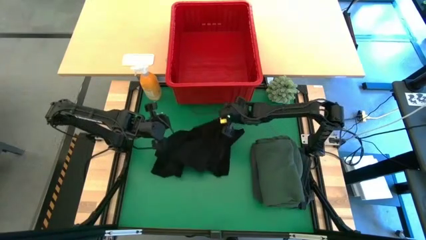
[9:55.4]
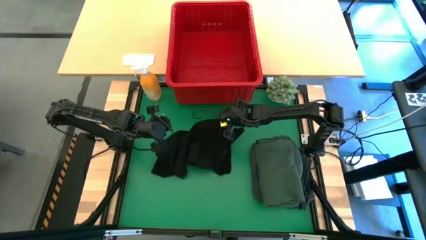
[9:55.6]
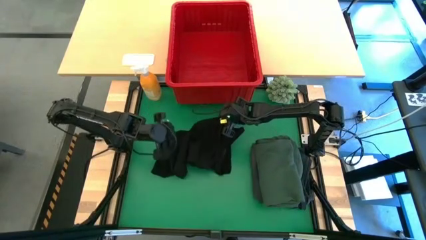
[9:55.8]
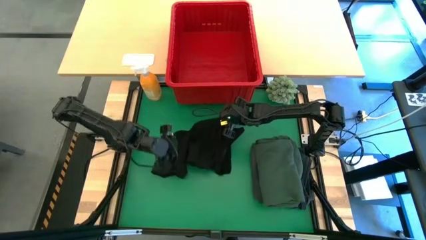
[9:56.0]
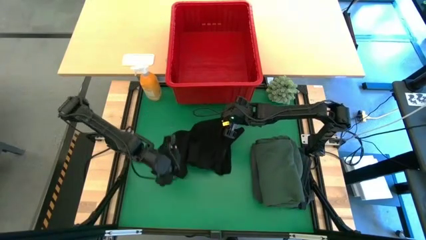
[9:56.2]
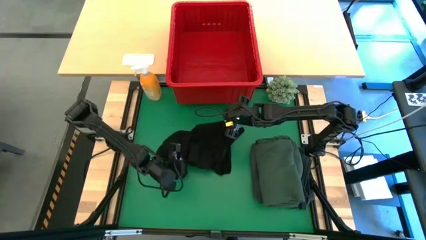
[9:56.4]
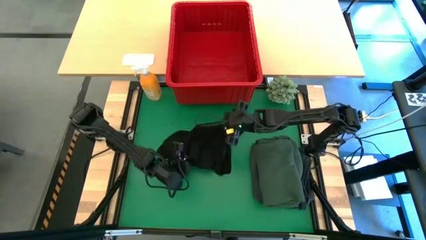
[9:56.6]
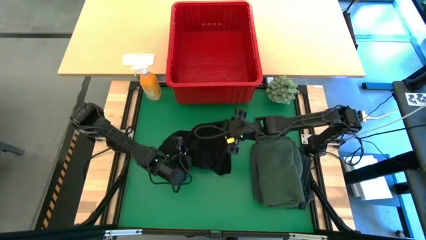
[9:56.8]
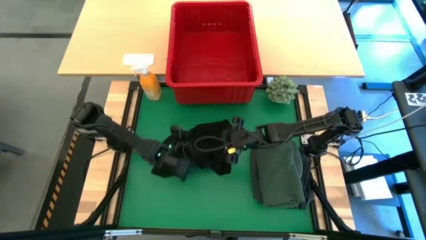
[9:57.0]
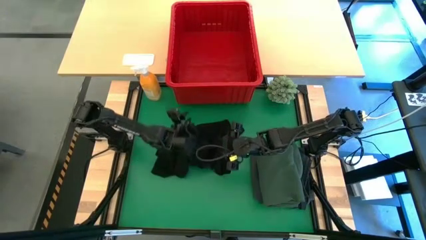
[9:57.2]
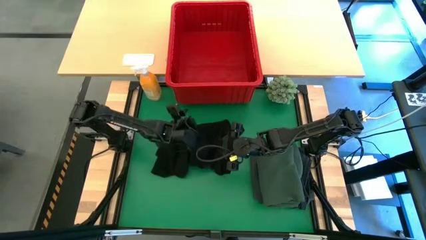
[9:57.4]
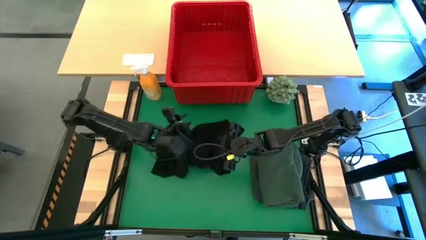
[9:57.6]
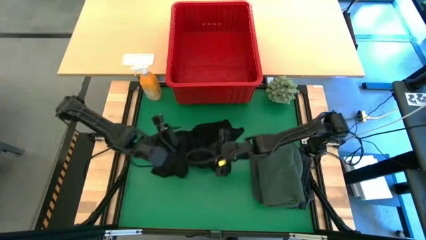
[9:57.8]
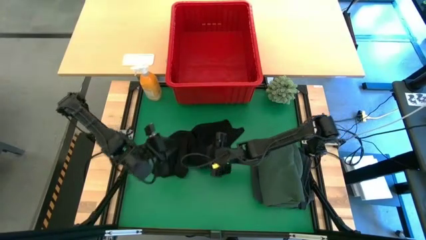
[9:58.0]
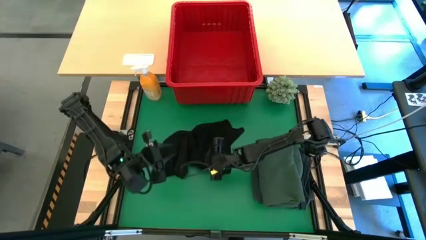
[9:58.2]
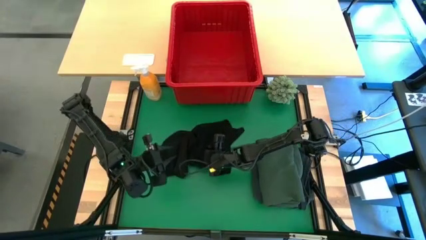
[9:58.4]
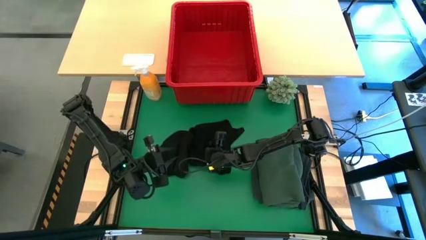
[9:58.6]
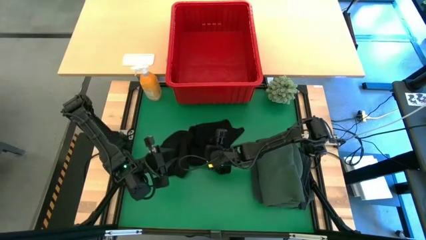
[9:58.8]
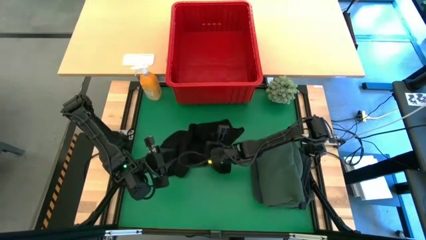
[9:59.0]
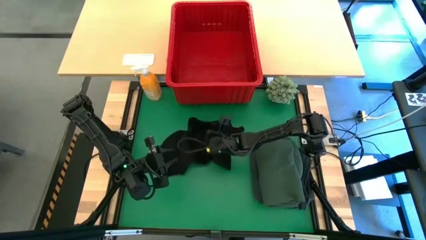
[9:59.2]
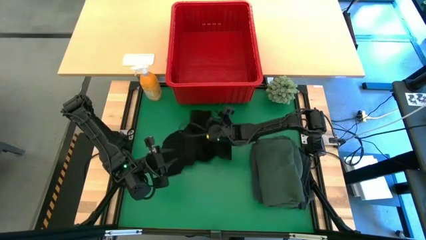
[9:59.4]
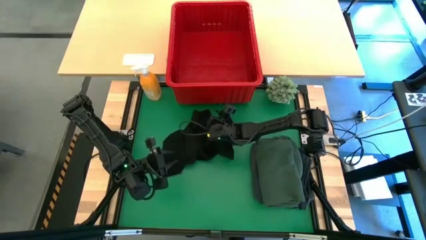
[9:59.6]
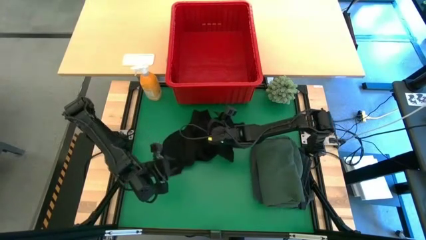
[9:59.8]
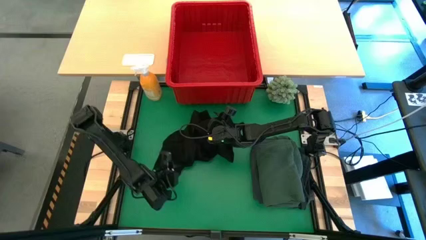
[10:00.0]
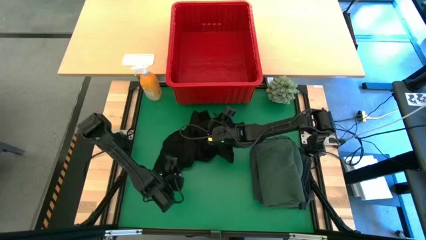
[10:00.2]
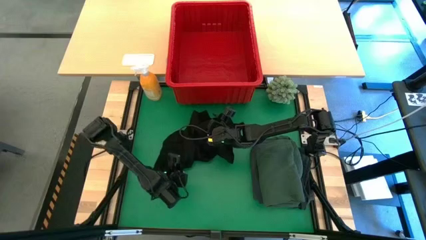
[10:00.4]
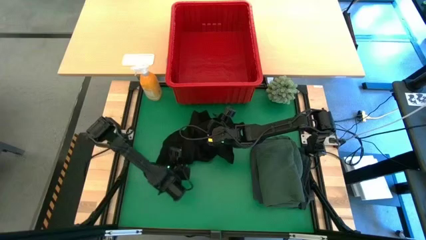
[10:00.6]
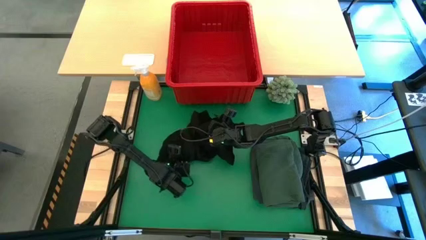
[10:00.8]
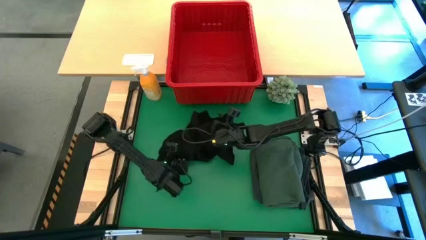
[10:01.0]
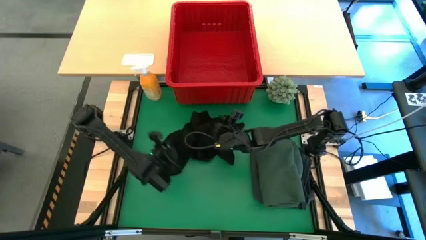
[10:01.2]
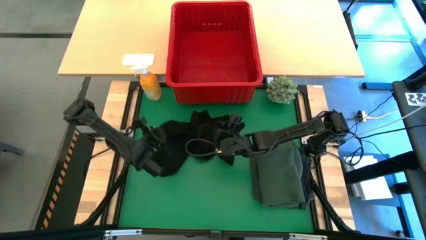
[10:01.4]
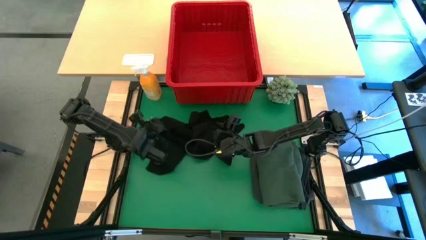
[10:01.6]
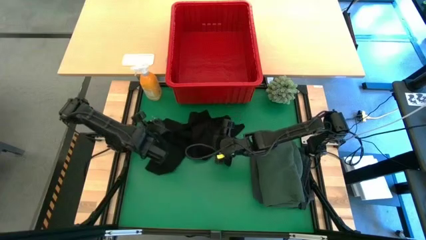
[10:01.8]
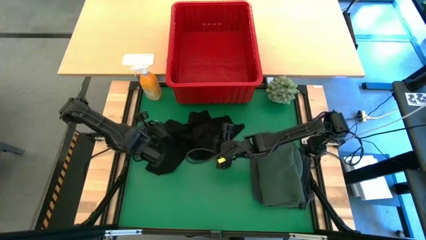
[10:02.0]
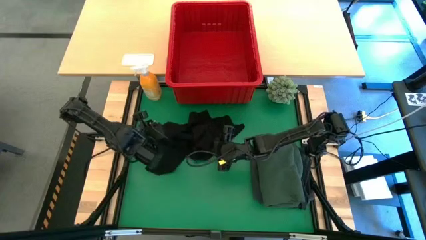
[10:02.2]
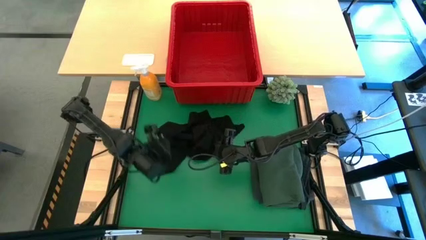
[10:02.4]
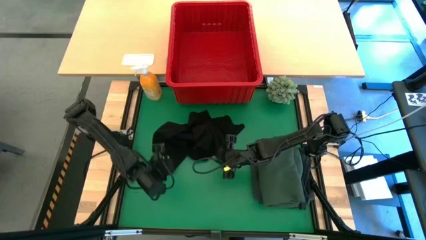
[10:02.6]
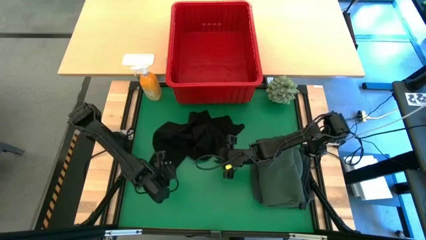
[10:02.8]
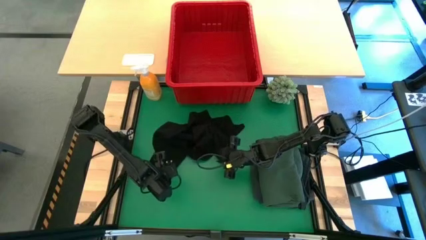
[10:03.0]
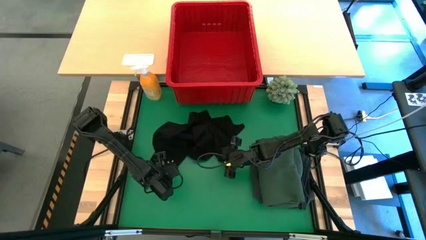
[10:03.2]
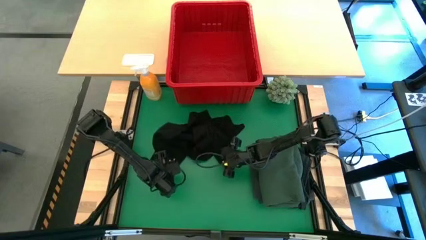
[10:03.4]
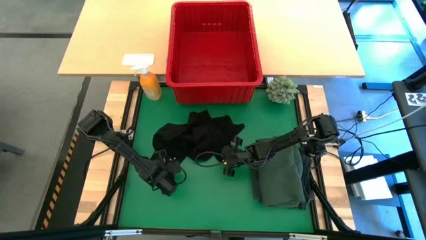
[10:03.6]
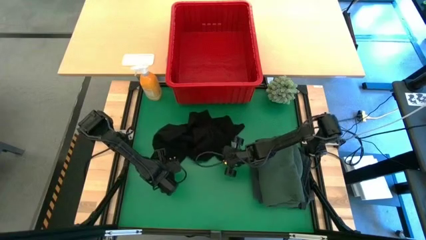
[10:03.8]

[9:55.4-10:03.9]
Task: Fold Laundry from Bin
Fold the black shirt

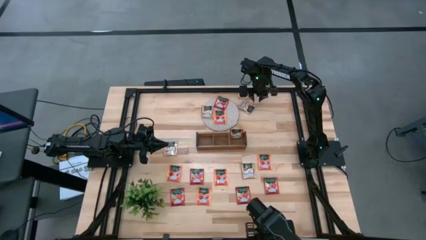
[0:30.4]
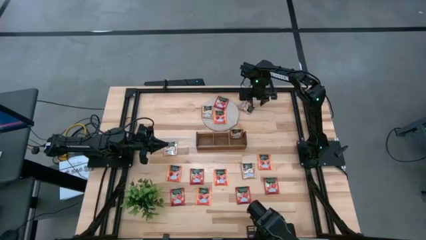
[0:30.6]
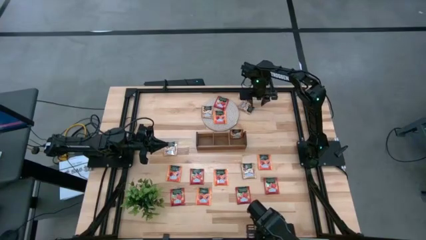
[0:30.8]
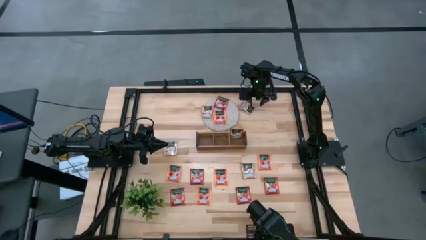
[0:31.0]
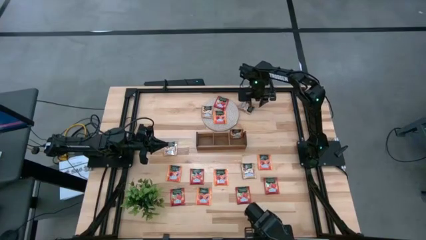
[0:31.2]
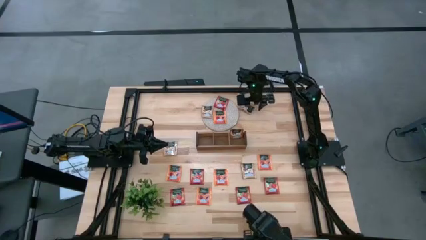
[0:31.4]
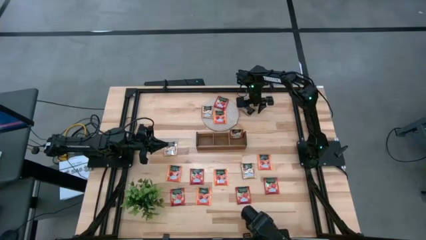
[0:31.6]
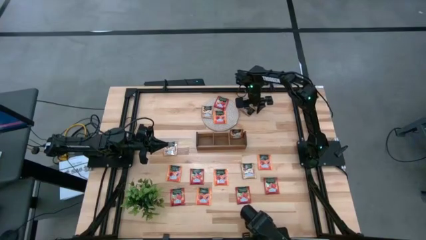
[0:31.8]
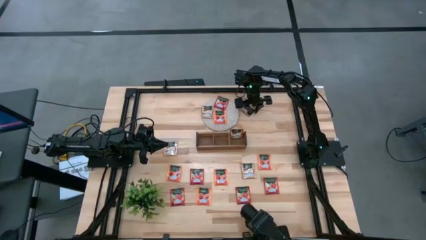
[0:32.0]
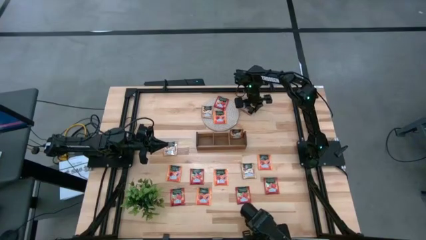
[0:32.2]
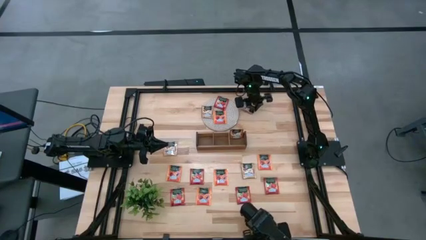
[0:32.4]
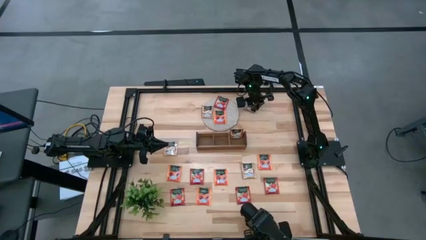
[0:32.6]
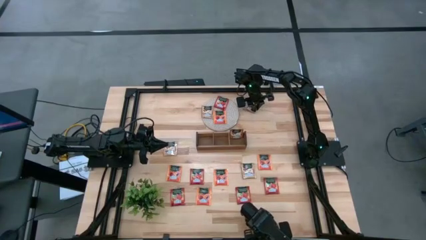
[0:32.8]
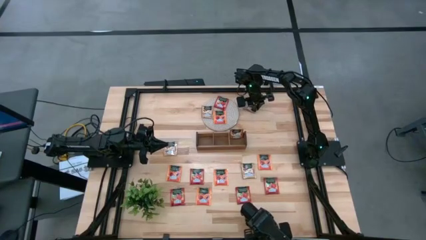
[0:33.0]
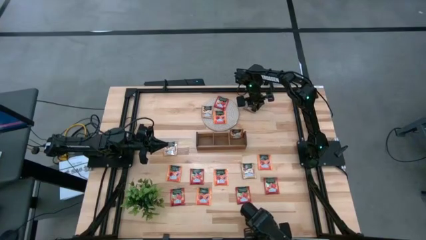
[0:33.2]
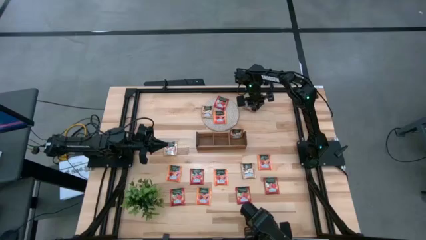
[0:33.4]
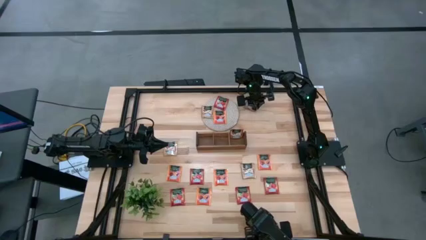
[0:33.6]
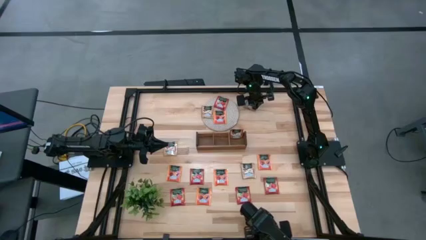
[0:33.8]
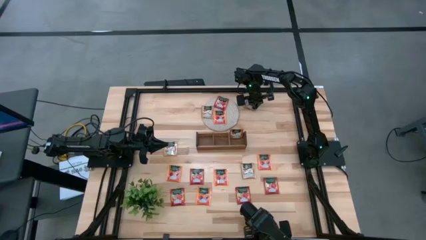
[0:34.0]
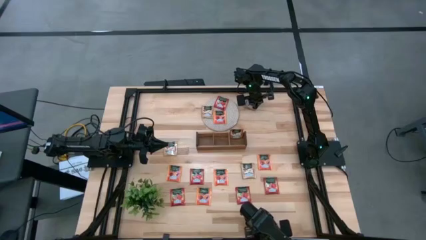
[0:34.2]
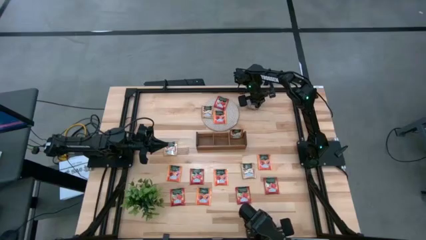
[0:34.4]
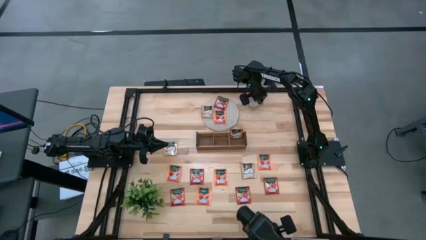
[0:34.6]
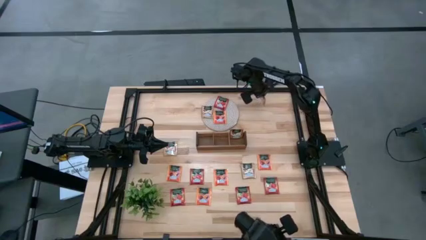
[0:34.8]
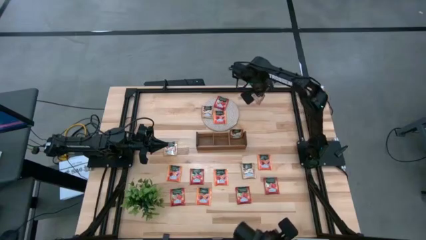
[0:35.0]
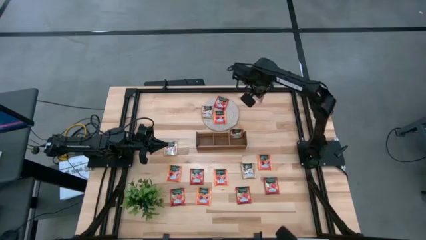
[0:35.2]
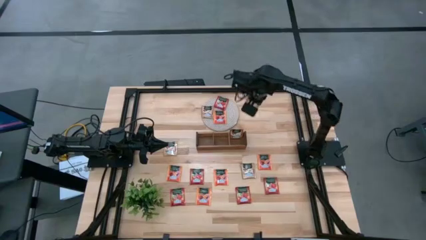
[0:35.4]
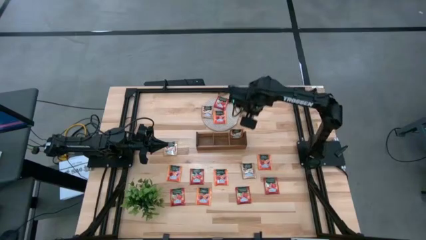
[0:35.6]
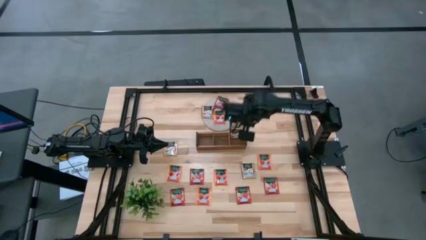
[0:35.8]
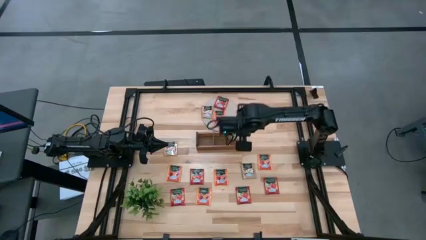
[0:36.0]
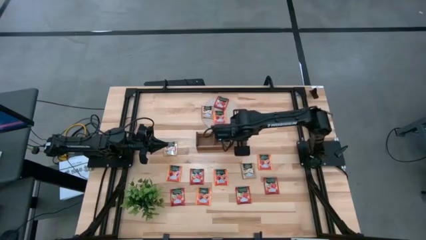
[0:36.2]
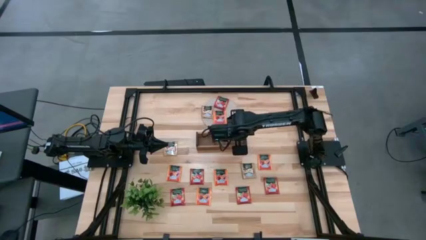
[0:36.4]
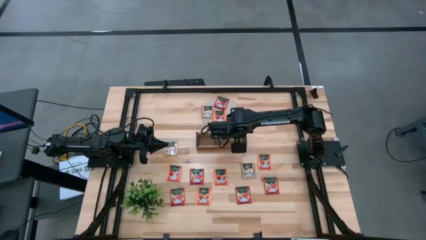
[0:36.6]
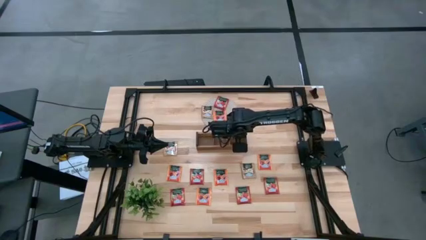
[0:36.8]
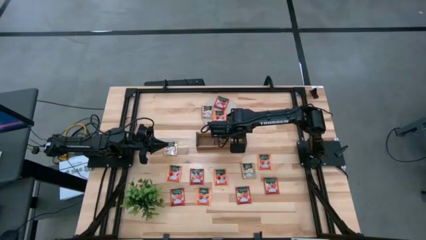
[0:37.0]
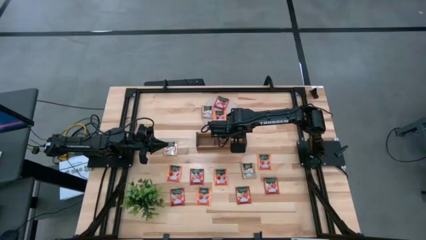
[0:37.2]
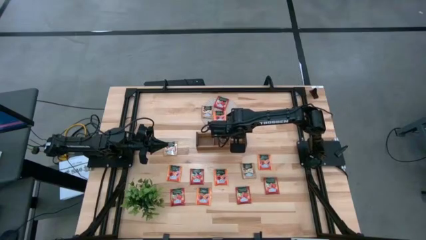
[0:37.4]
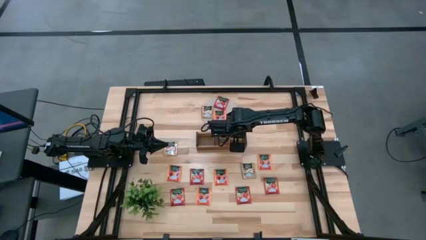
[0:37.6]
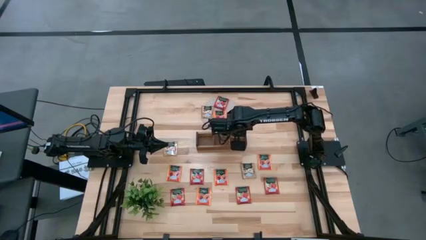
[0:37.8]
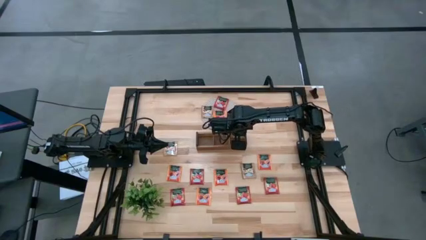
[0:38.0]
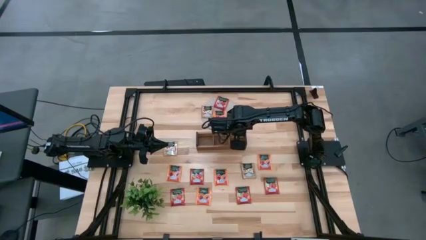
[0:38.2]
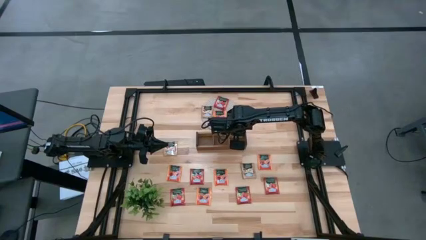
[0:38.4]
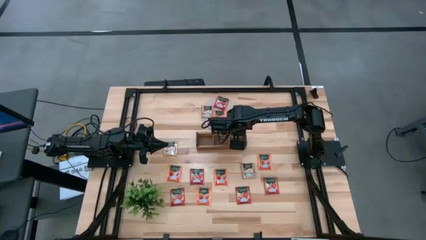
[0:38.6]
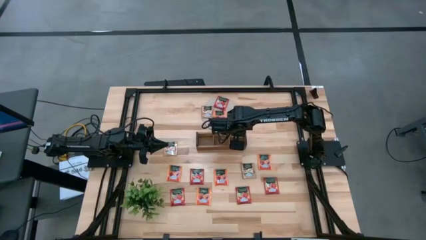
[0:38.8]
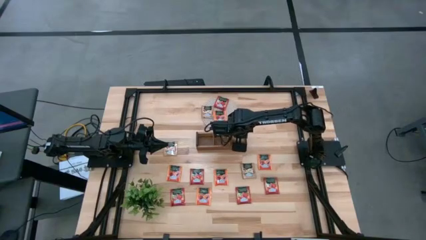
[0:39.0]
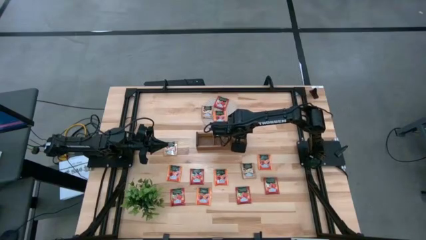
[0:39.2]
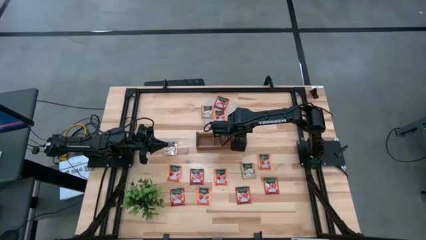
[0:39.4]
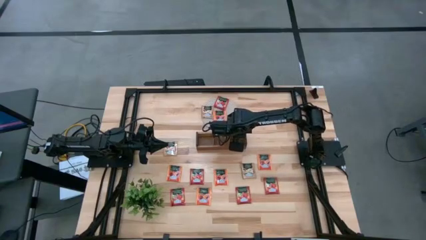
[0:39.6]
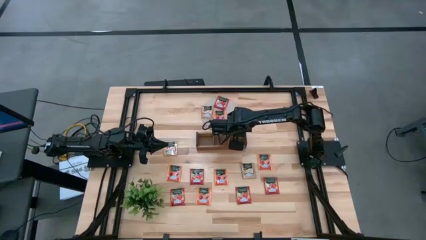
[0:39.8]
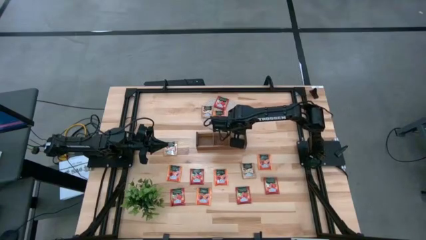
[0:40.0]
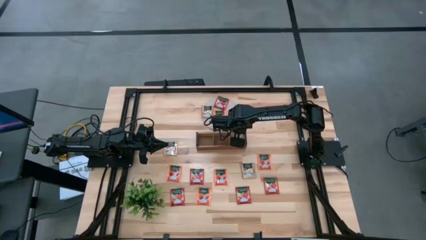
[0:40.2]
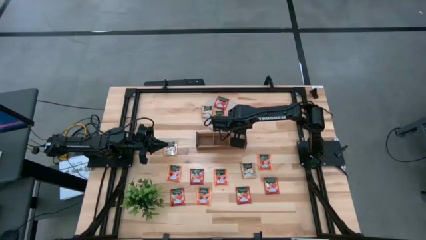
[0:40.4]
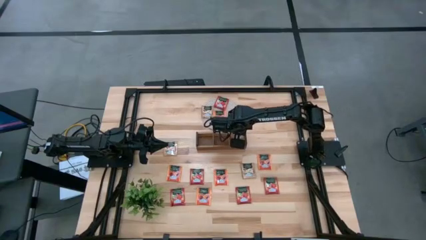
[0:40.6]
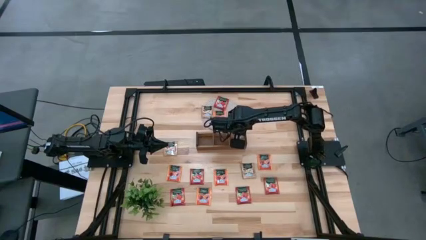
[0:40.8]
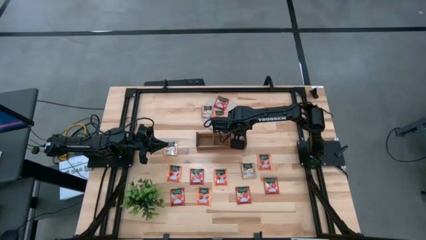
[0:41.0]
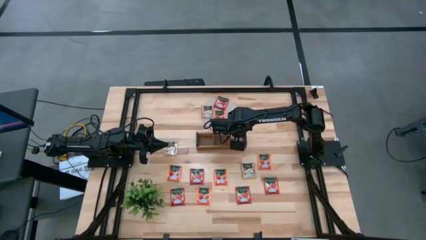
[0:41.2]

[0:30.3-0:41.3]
Task: Pick & Place Tea
Put the brown tea bag into the right section of the wooden organizer
